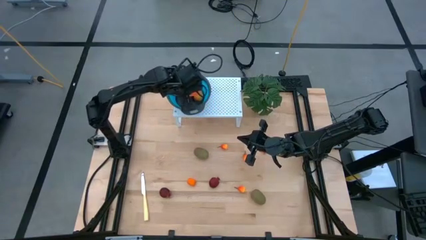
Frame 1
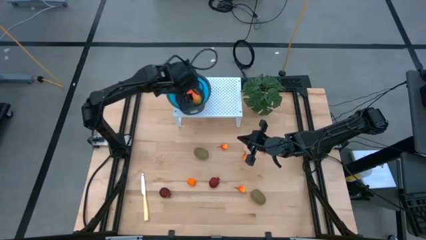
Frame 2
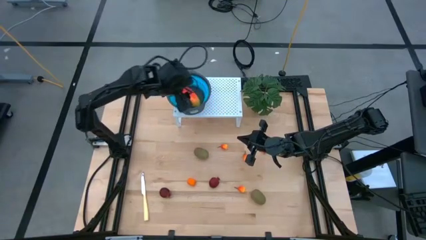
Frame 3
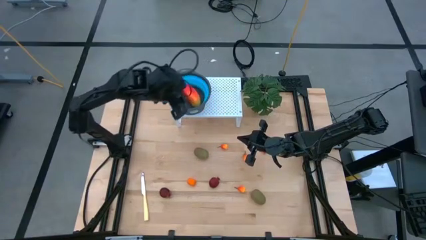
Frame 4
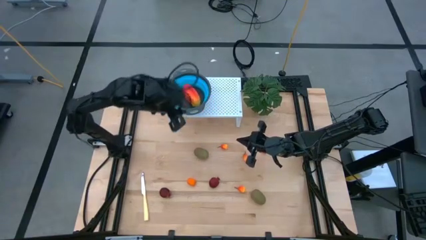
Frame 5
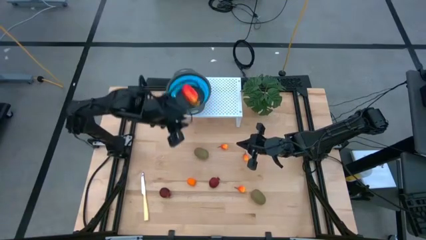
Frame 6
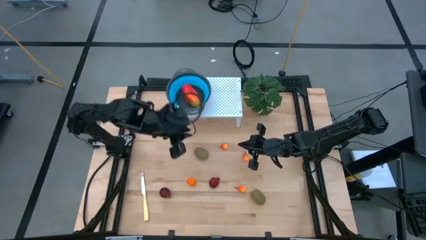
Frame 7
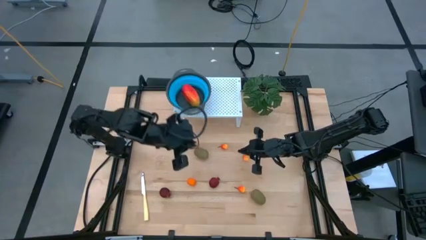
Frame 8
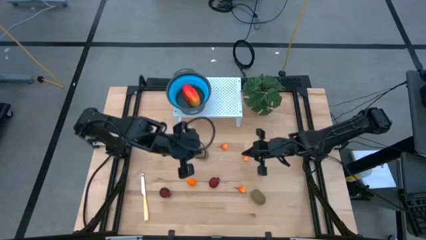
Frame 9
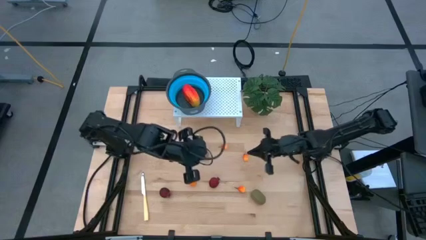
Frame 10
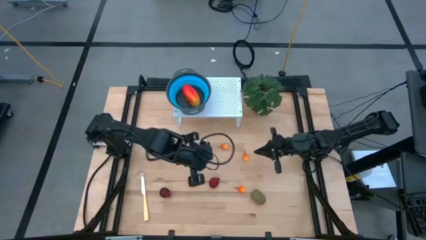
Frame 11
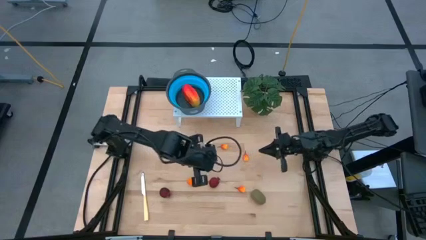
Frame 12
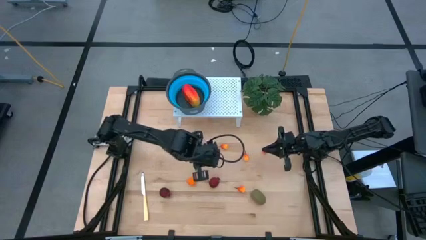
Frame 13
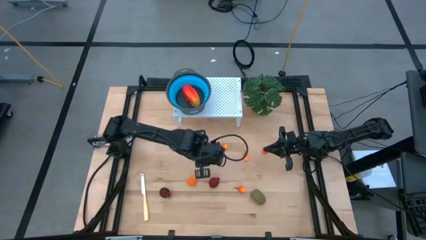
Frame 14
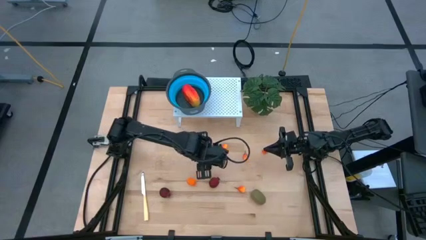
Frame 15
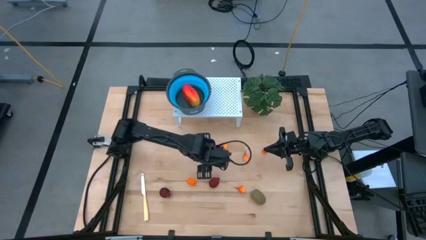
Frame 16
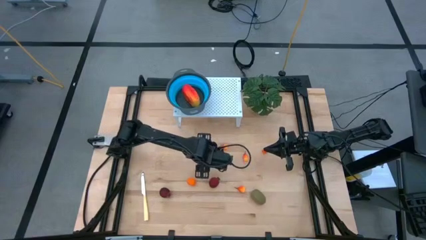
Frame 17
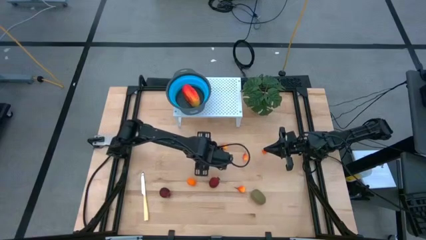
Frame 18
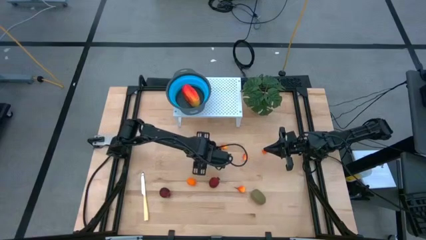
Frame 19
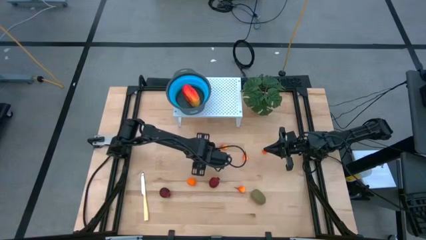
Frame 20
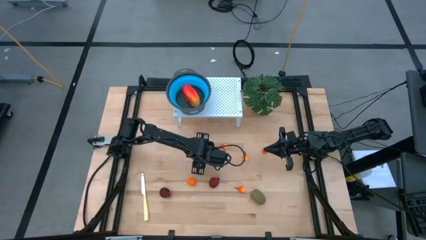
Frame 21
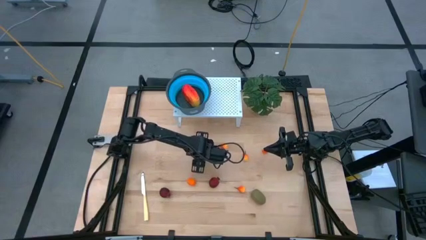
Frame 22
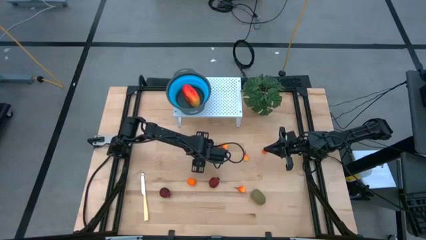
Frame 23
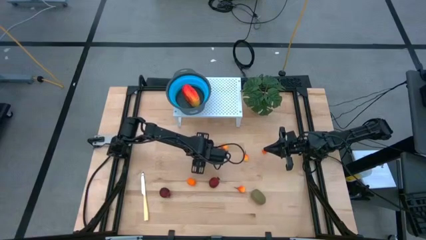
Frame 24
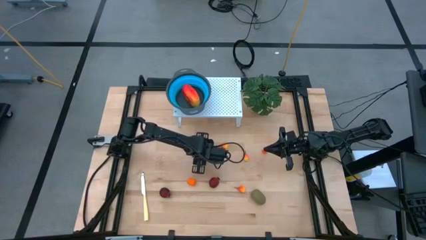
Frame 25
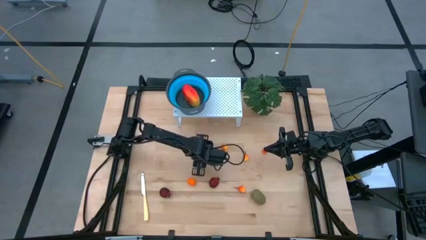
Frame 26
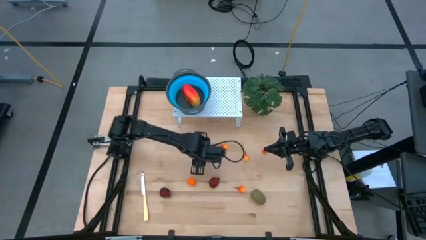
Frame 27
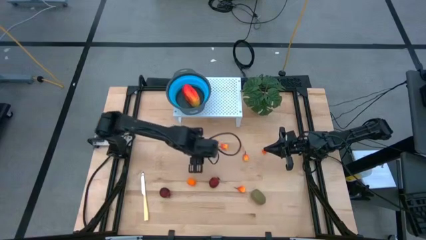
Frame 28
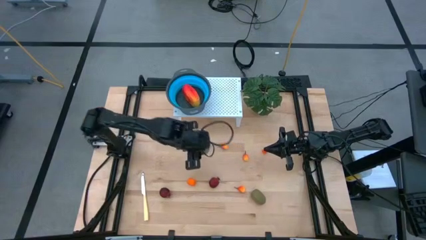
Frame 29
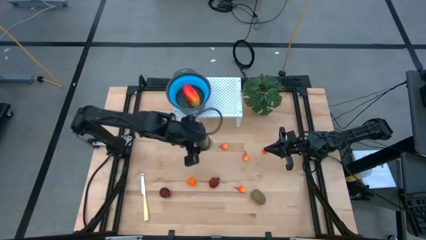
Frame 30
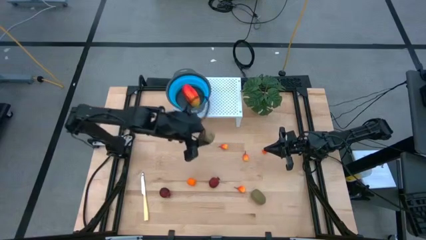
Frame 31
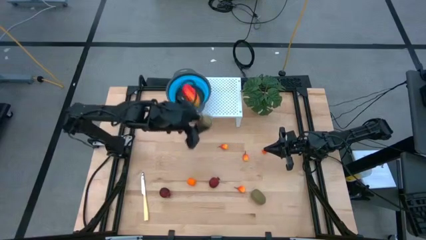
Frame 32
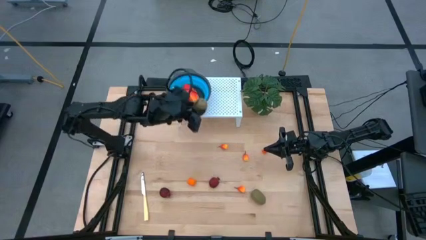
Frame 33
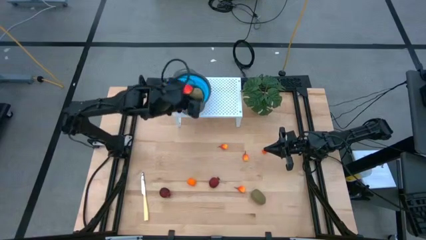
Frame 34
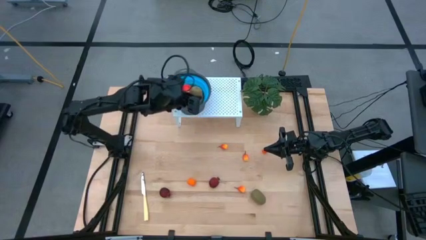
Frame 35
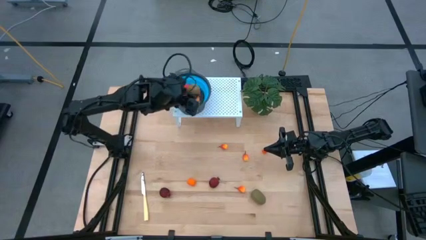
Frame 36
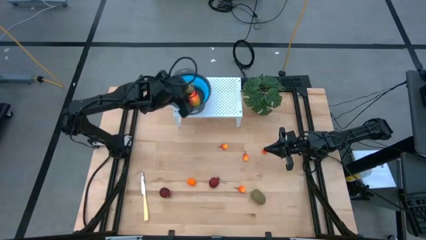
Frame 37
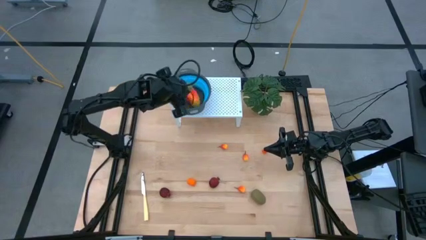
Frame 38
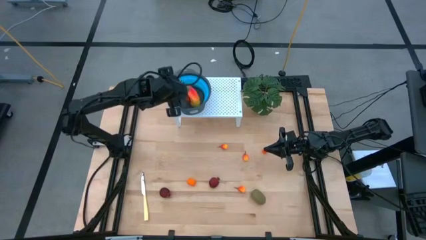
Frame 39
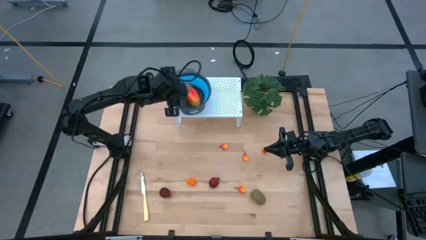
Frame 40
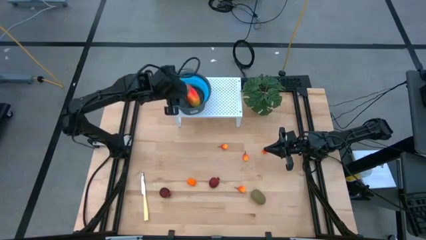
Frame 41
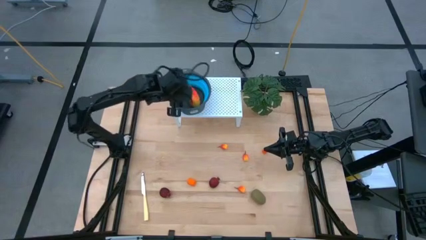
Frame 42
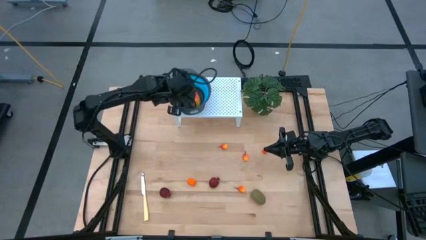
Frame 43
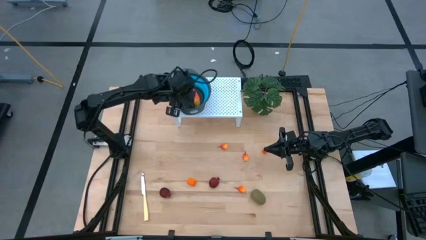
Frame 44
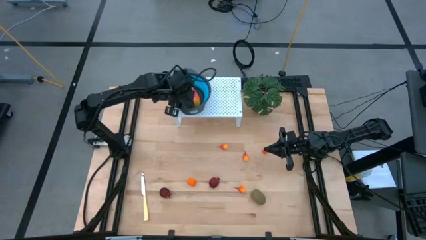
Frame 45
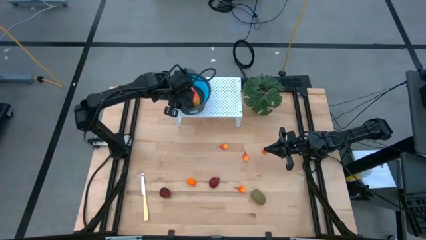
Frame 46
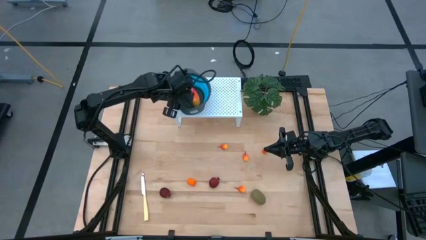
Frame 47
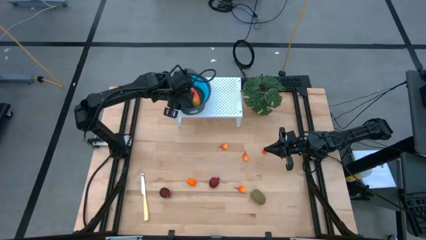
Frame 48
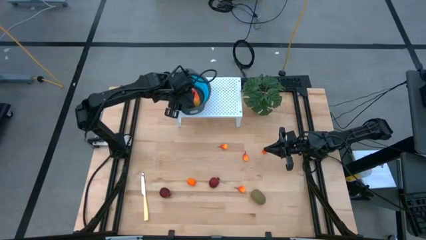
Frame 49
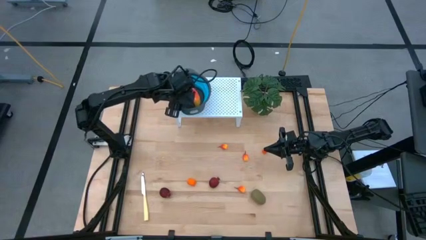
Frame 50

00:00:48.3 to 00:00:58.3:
Task: Pick & Place Fruit
Put the kiwi in the blue strainer bowl on the shelf

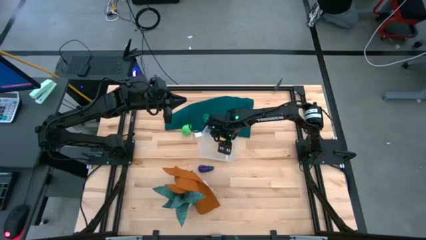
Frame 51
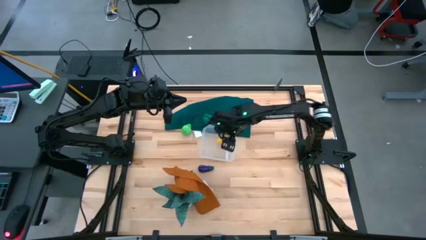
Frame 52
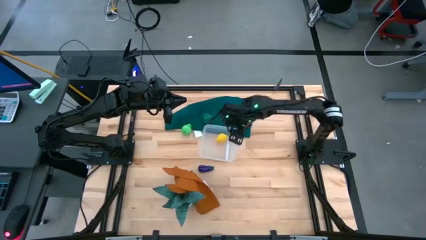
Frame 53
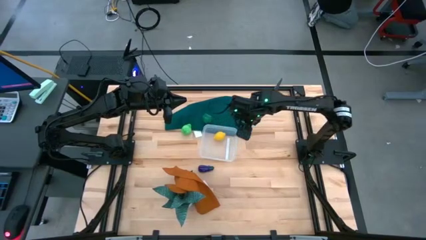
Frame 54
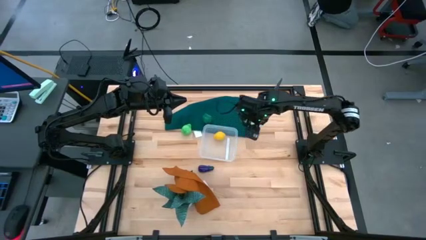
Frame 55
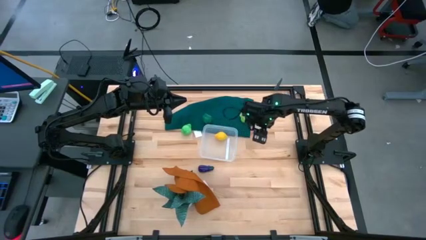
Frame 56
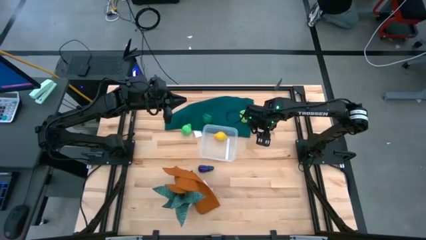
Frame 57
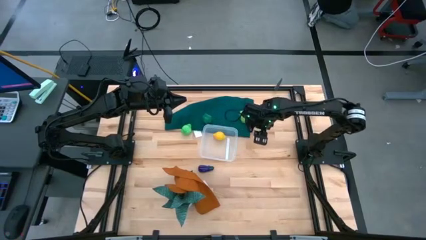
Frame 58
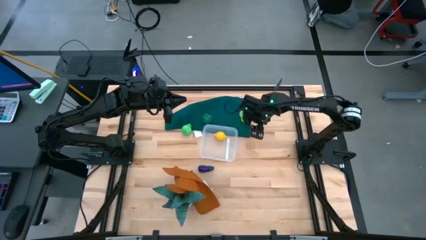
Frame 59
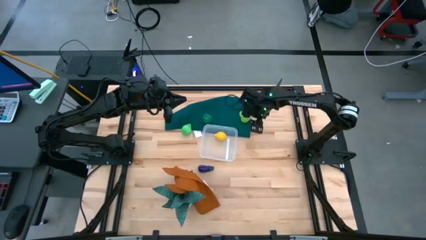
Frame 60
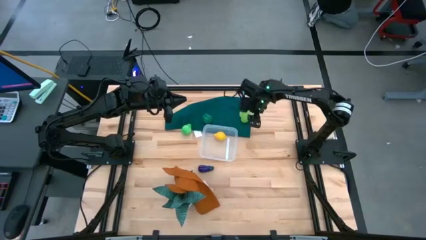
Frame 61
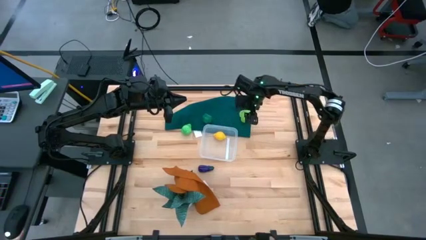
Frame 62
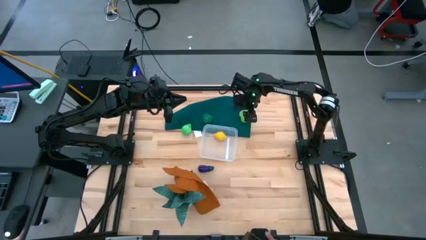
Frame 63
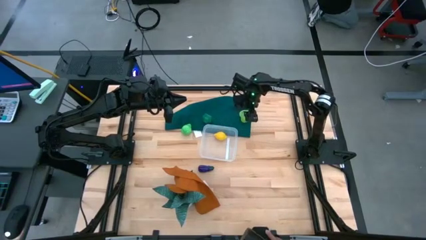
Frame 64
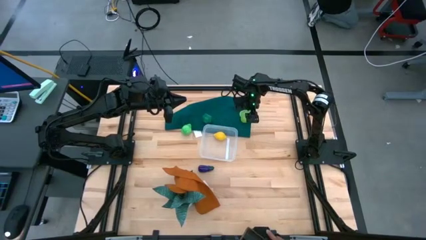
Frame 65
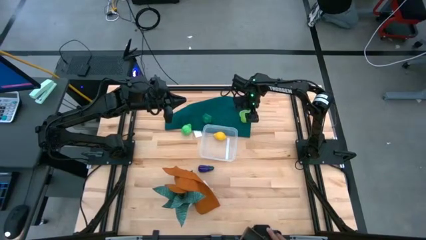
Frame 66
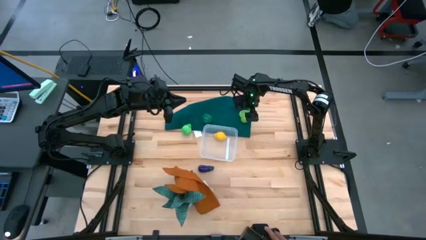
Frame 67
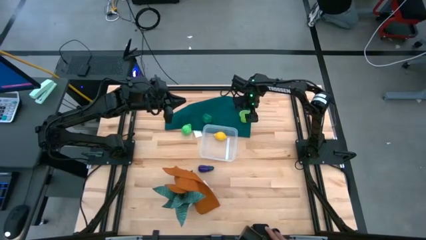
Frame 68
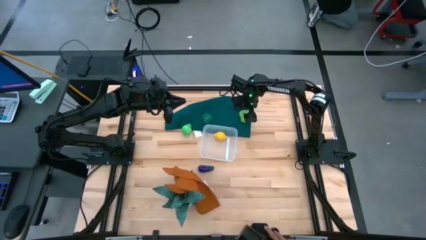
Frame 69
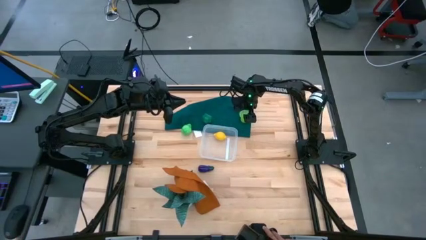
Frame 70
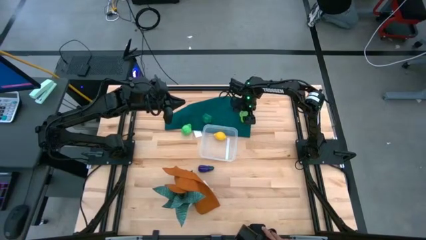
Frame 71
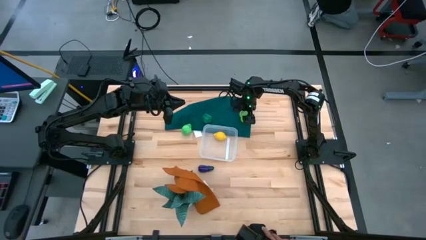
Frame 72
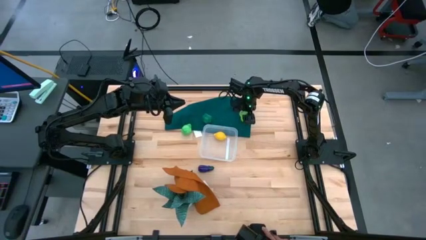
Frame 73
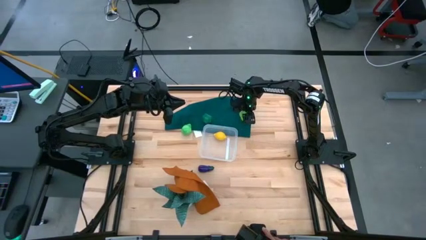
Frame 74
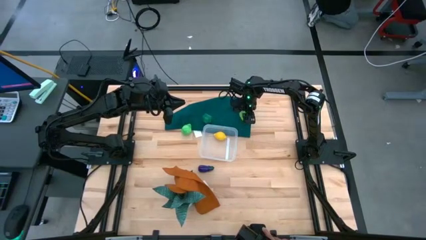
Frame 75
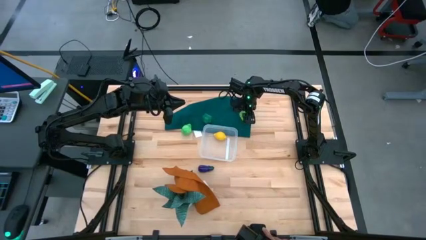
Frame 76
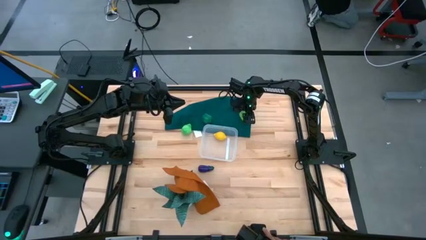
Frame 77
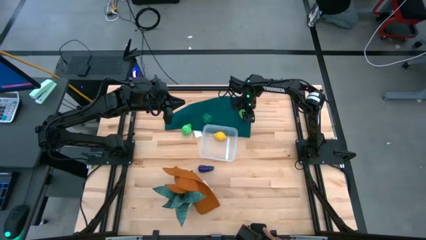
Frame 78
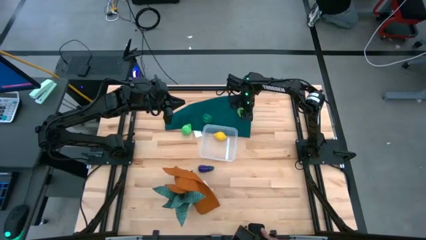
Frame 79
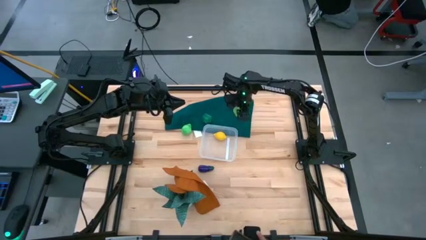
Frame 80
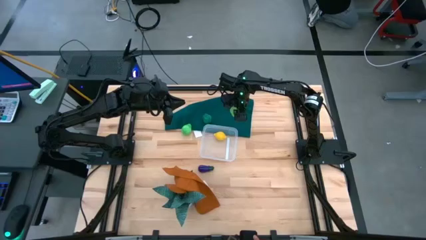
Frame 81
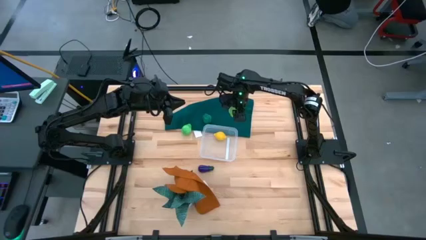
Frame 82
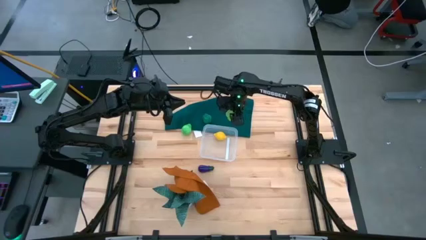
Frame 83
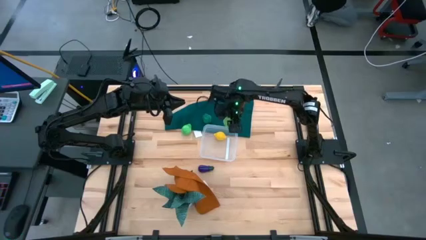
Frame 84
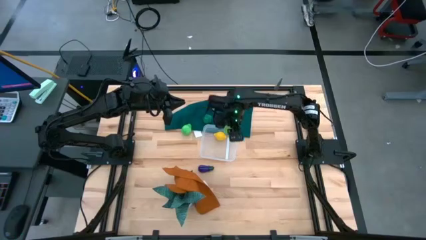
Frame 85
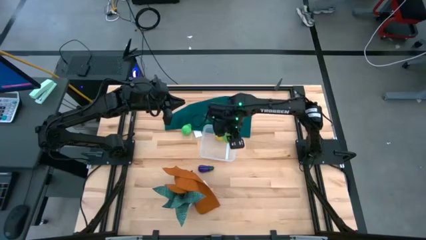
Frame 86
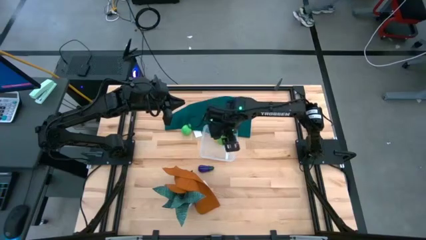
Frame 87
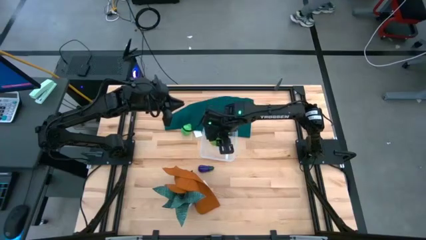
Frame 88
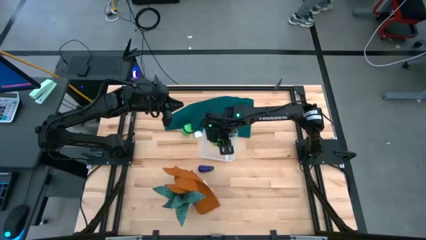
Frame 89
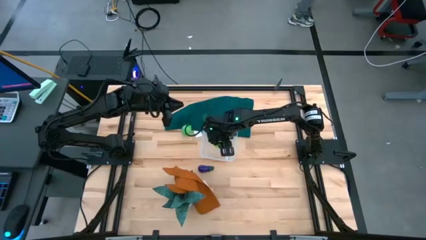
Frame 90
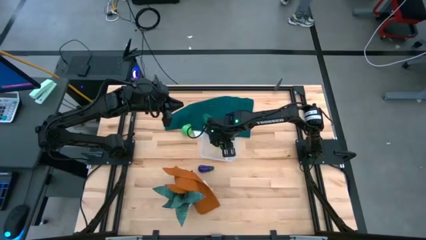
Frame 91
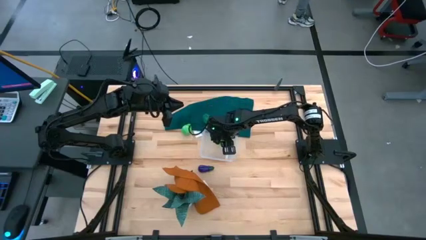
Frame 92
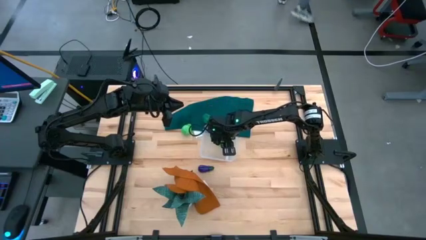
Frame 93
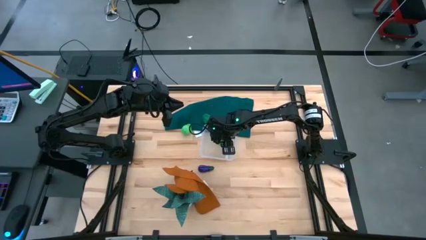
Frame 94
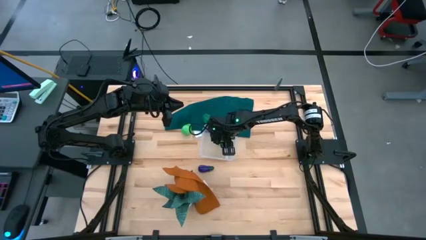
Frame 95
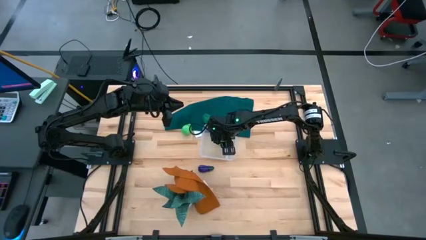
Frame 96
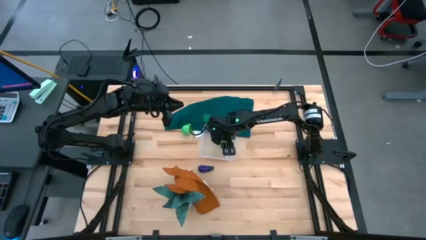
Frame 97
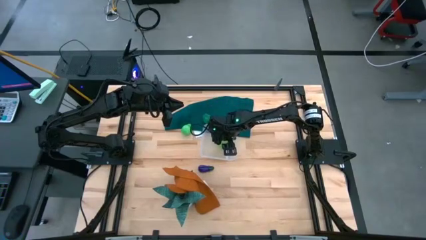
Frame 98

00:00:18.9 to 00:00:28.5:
Task: Pick and placing Produce into tupperware
Put the melon into the bin
